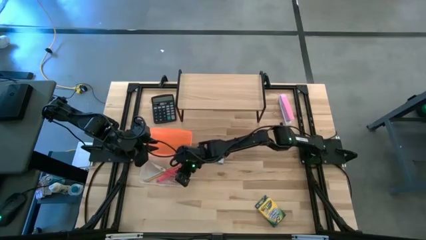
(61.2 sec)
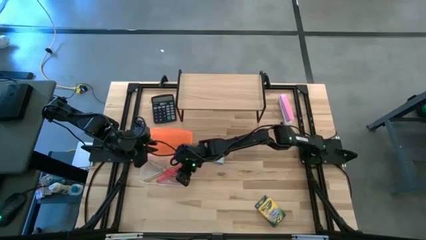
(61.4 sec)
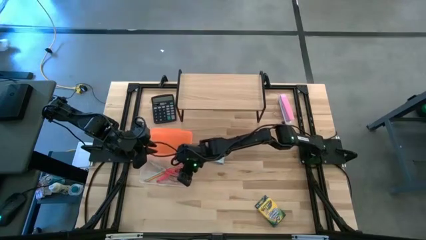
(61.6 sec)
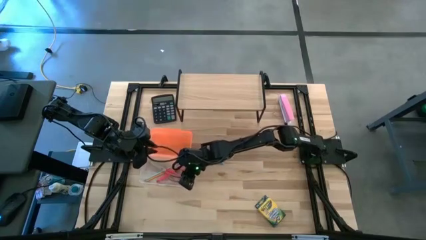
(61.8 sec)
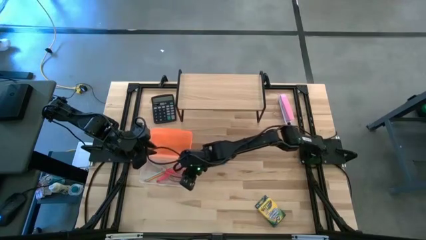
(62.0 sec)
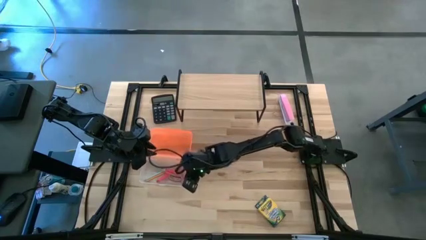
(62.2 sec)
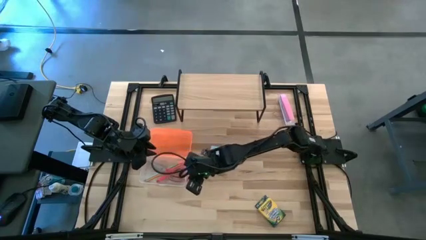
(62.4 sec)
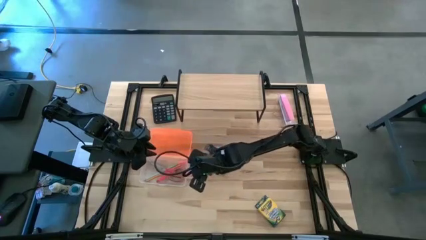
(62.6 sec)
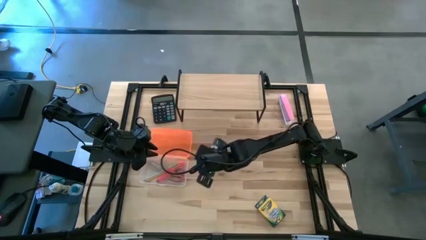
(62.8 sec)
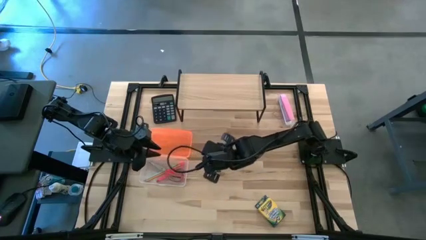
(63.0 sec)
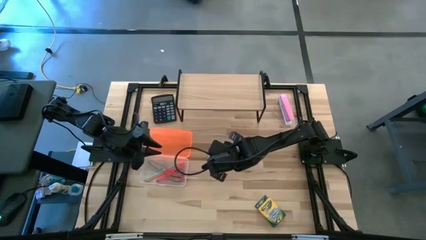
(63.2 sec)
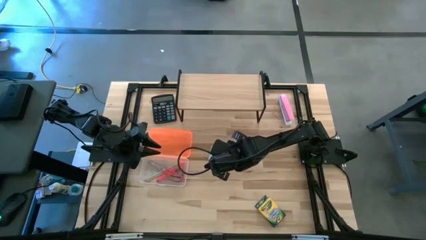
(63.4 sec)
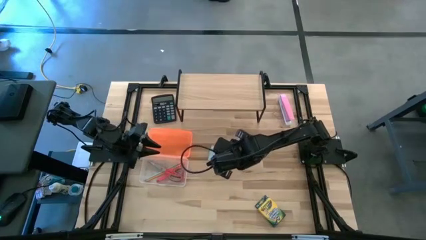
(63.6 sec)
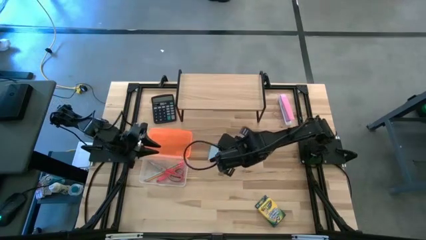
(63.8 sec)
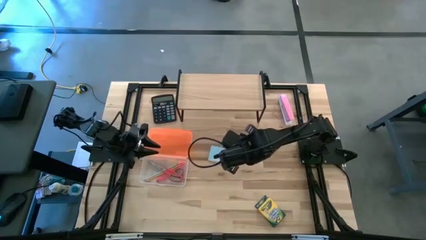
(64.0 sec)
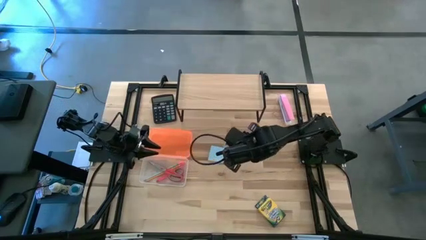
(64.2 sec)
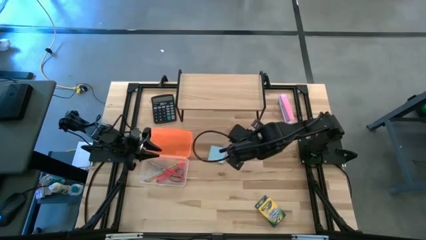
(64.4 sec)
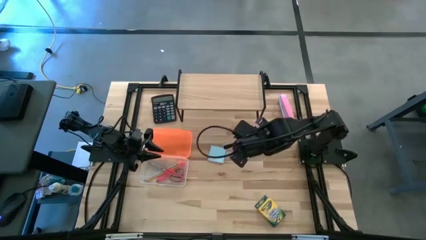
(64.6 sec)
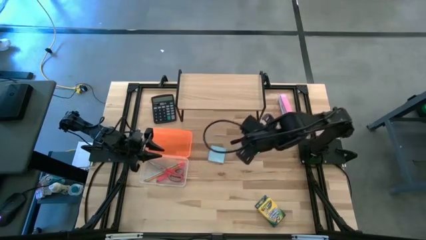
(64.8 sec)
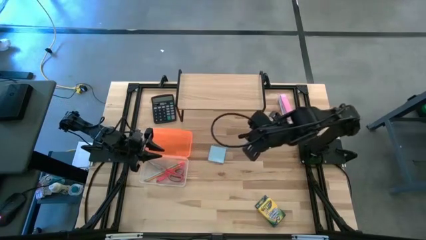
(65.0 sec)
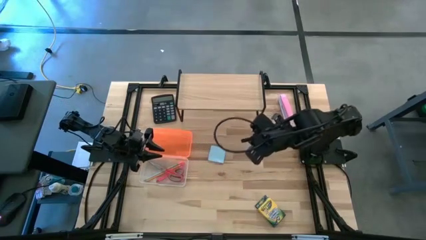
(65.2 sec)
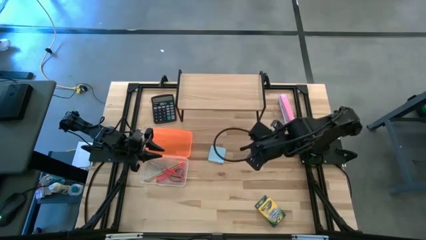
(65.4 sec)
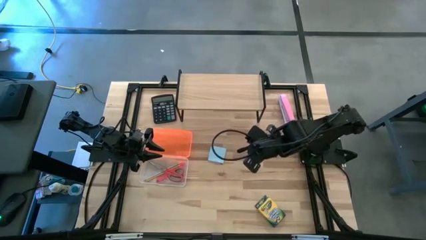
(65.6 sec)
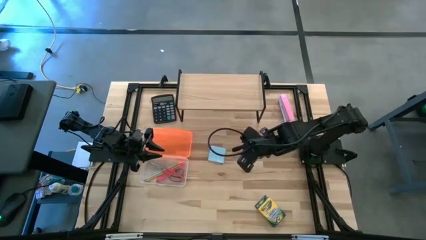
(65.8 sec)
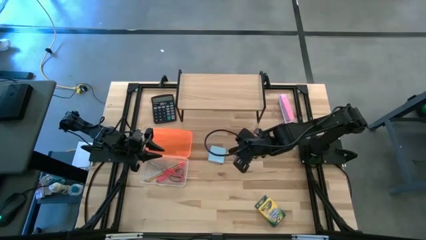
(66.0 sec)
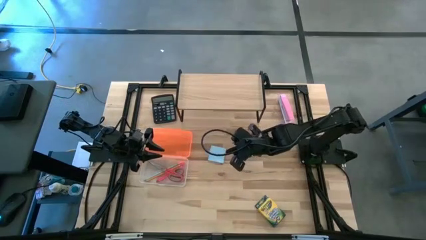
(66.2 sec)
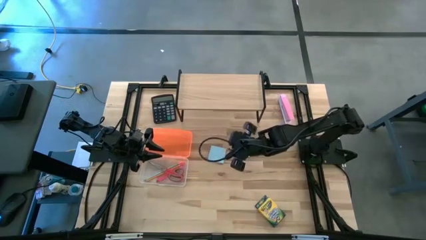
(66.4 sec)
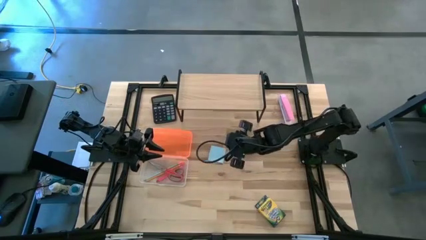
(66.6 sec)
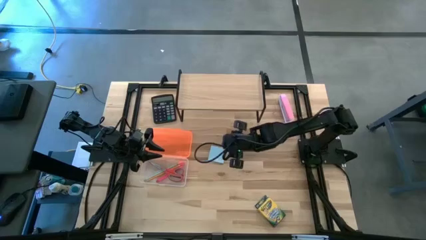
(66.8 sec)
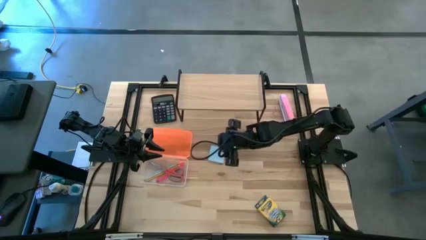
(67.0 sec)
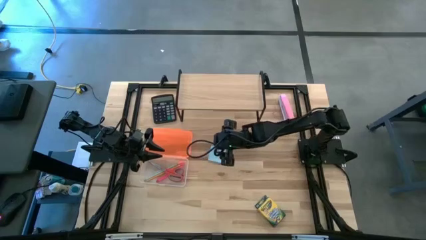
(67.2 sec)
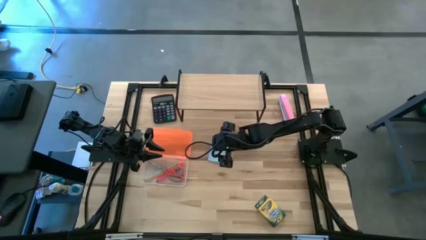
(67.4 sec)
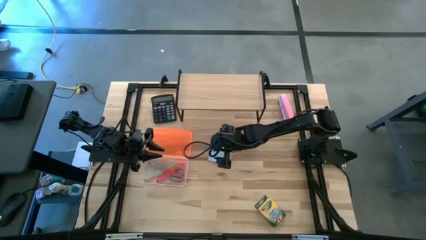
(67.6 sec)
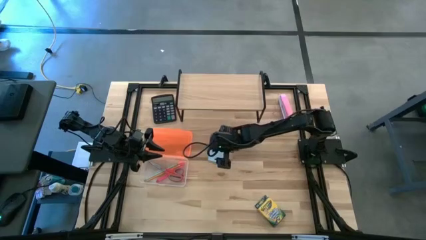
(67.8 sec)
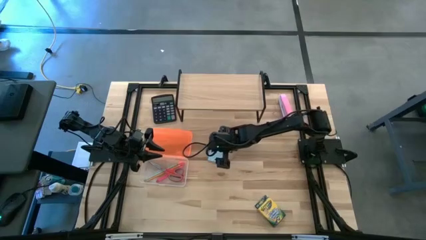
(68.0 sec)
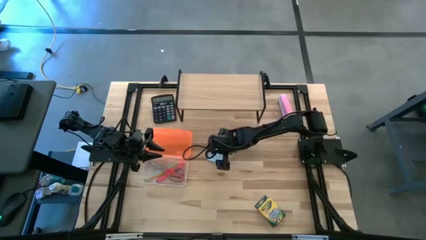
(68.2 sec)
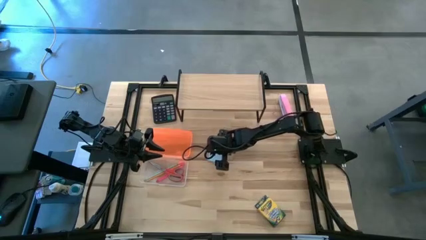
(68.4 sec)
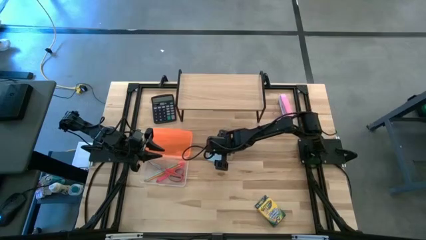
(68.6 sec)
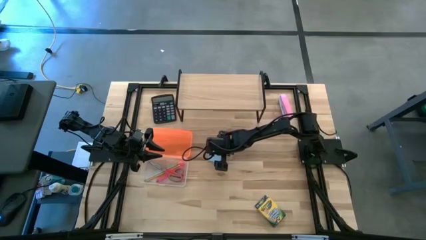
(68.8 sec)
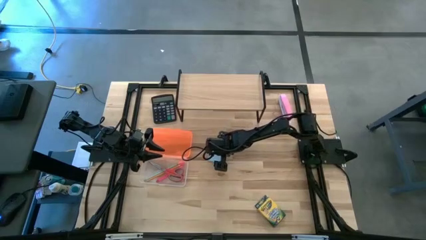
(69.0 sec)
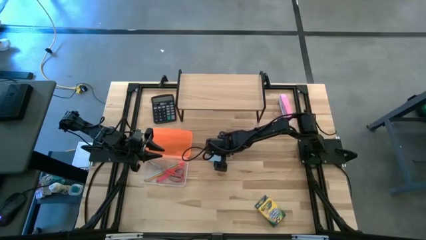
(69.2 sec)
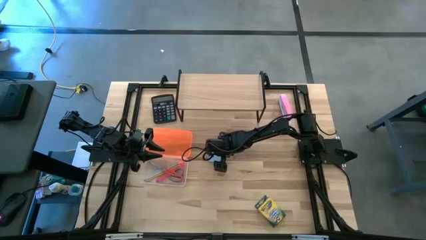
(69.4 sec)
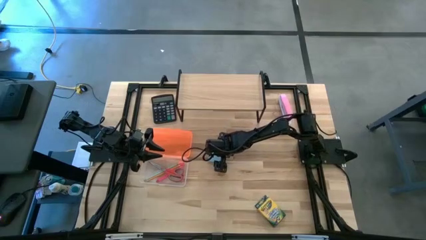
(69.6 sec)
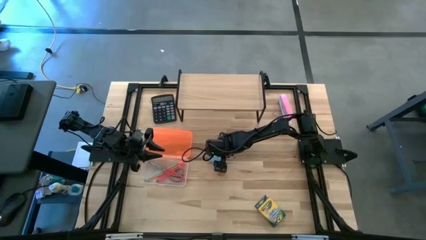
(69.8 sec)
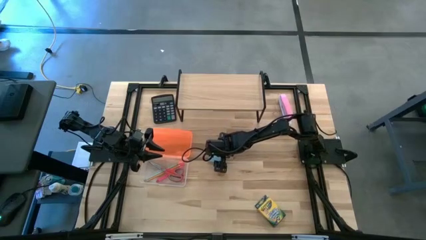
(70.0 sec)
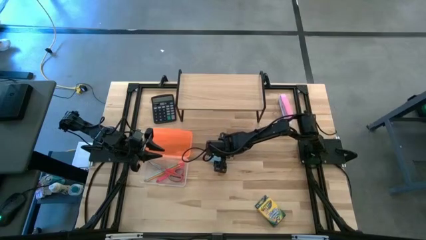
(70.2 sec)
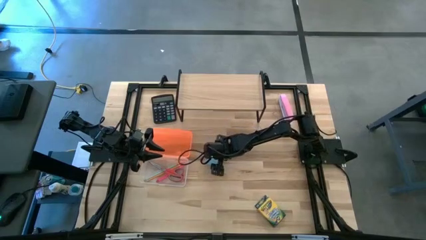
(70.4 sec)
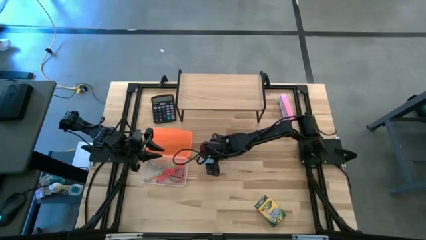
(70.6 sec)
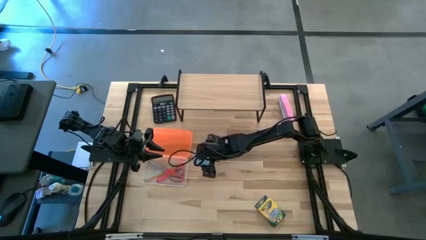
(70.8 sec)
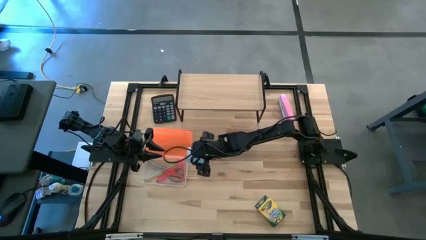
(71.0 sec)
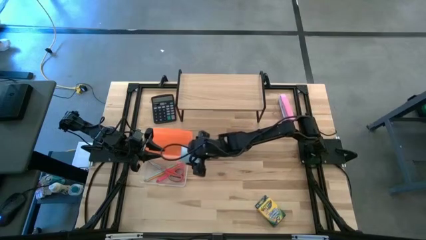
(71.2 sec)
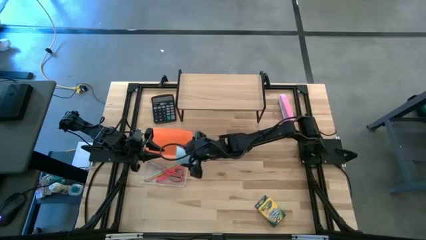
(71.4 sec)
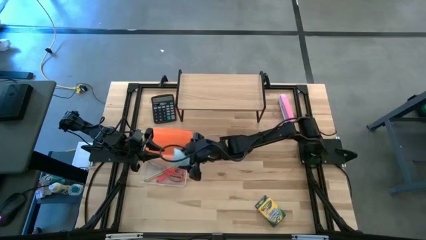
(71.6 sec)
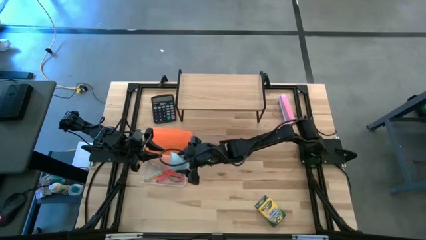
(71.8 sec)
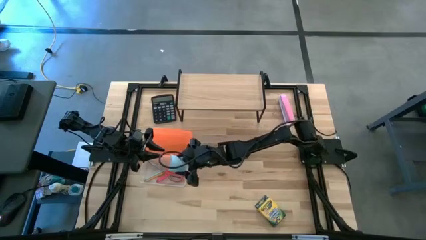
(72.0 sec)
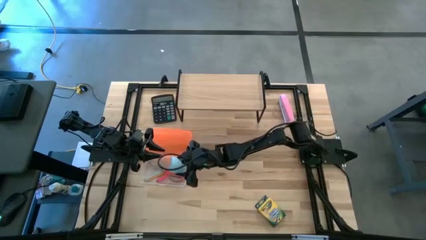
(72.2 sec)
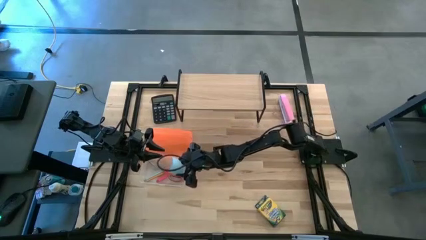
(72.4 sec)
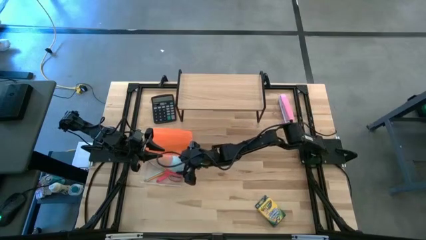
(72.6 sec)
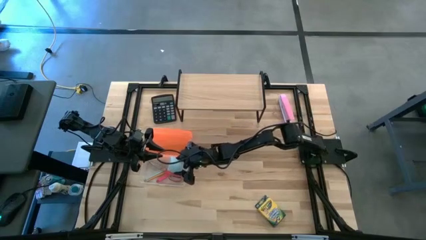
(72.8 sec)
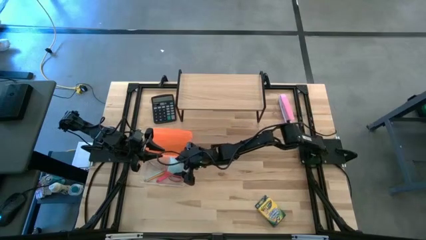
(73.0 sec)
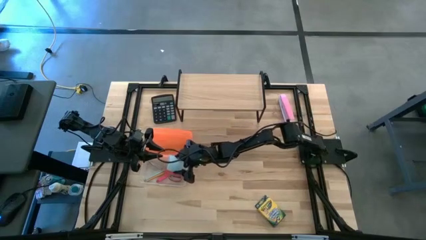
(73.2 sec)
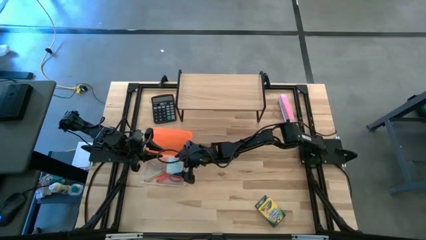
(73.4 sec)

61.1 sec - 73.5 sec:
Task: Pack school essentials
Put the blue sticky note into the supply box

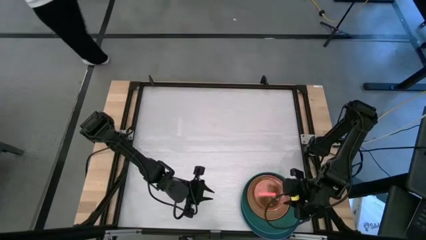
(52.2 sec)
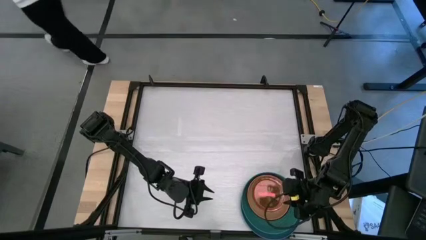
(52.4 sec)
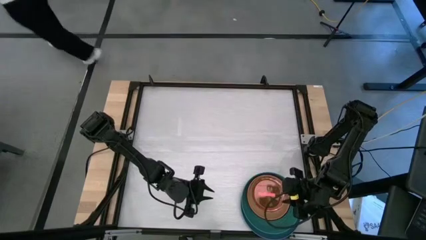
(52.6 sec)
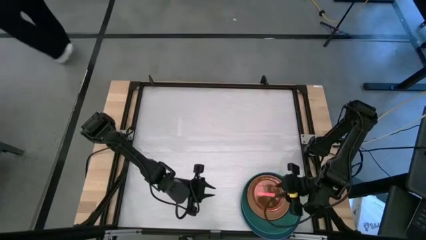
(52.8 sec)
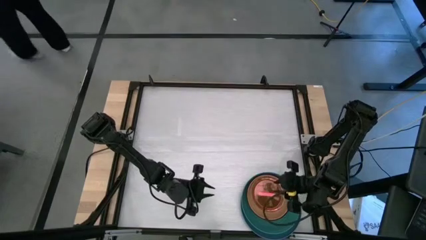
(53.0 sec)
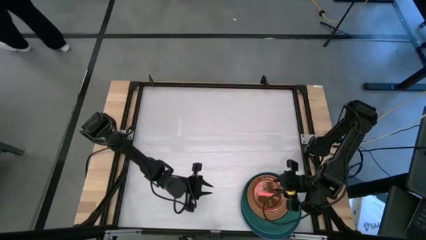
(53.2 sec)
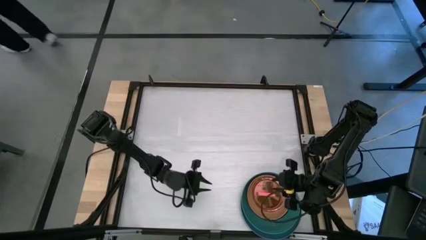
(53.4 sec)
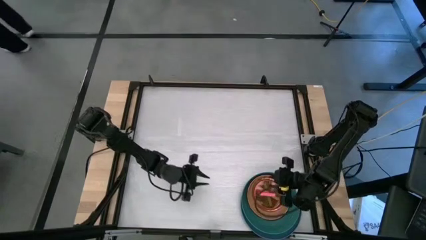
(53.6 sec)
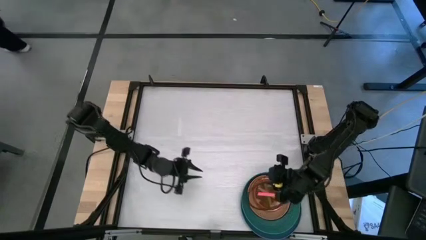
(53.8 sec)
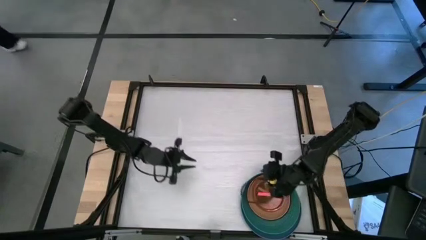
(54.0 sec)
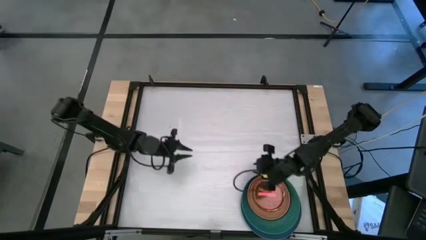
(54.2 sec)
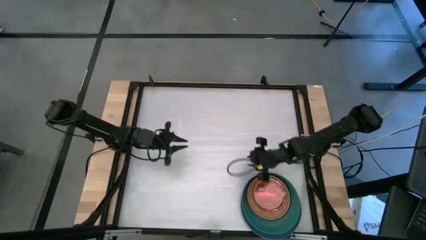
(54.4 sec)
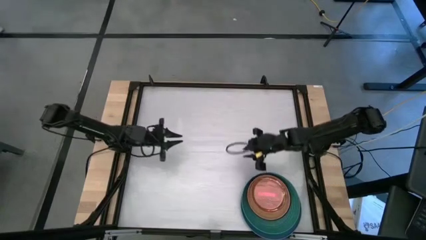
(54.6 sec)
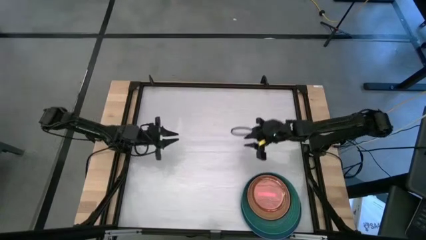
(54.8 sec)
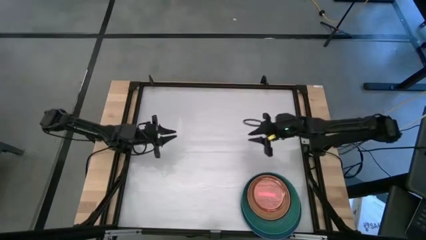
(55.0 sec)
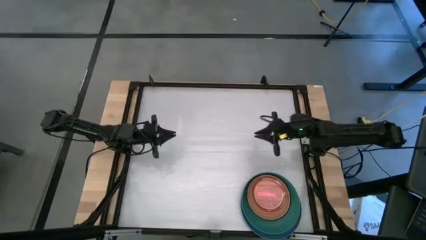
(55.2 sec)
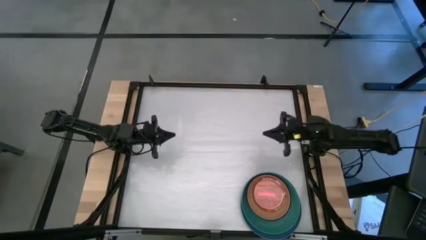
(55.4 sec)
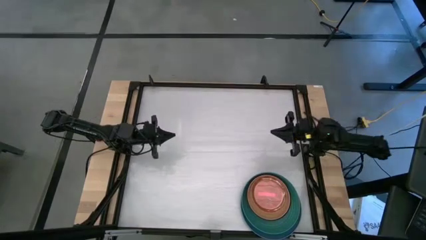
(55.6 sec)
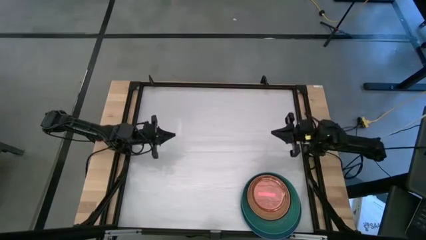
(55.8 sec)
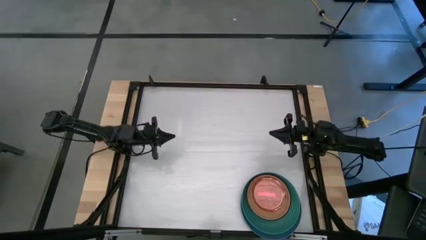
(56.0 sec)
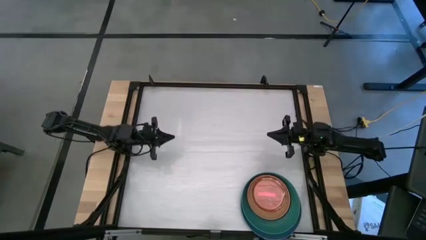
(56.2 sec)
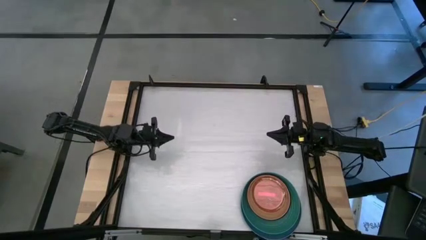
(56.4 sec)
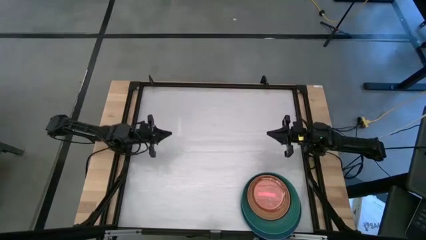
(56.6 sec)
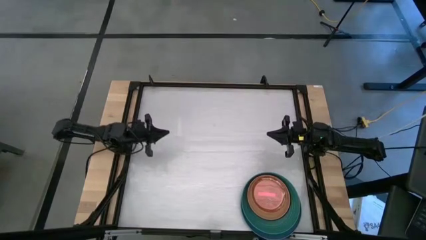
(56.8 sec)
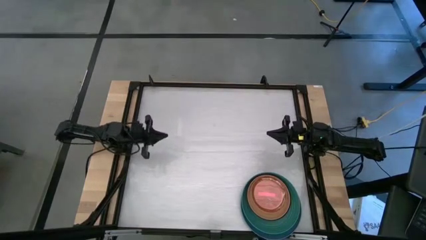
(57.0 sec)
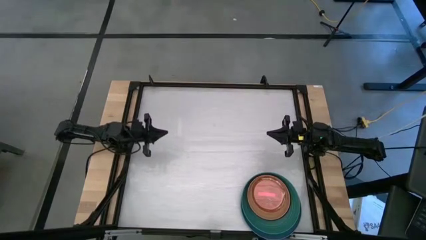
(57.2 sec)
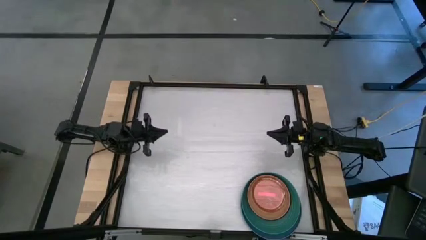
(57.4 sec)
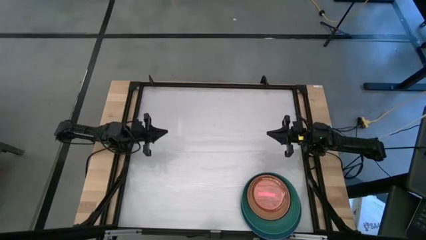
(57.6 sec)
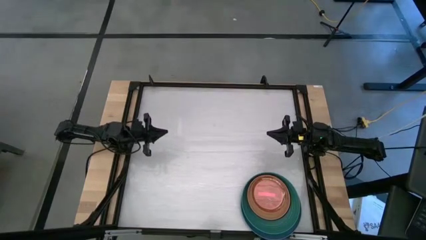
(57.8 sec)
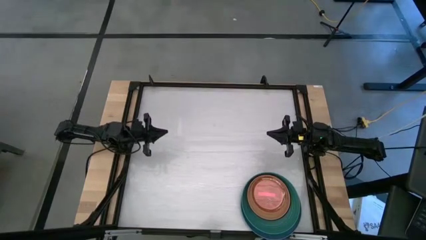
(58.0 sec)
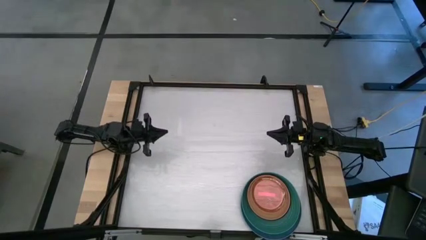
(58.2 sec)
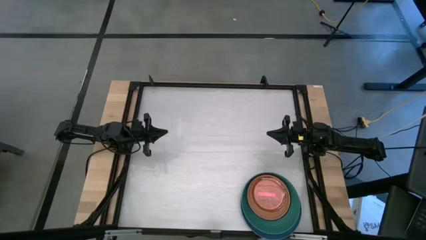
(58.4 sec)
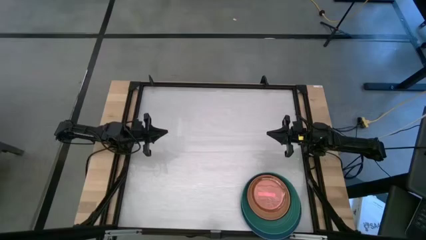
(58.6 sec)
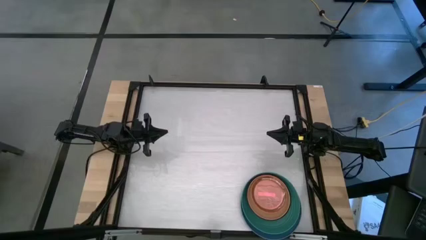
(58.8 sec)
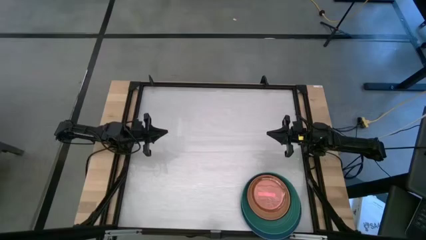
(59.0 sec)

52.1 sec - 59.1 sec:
Task: Stack plastic plates
Return to Home Position
